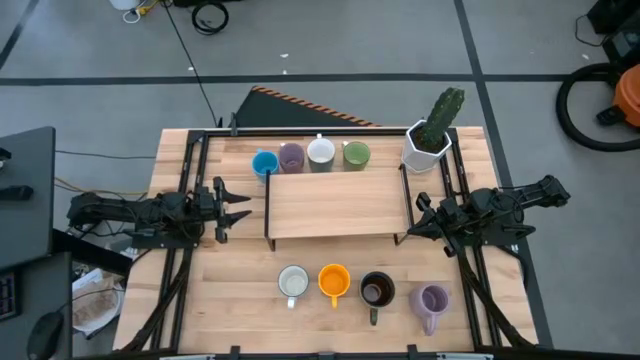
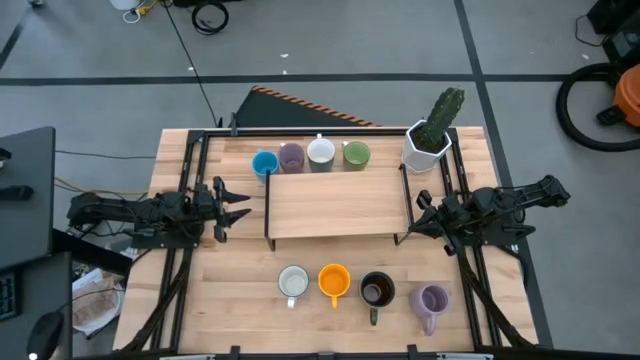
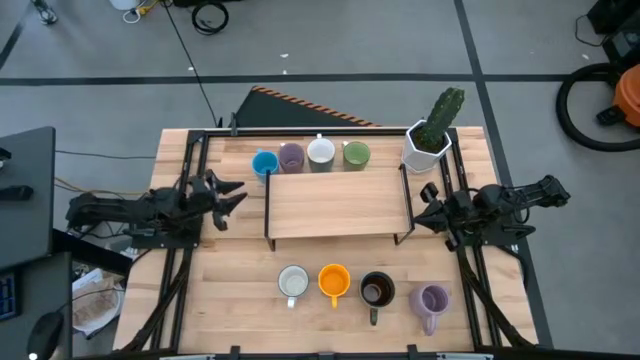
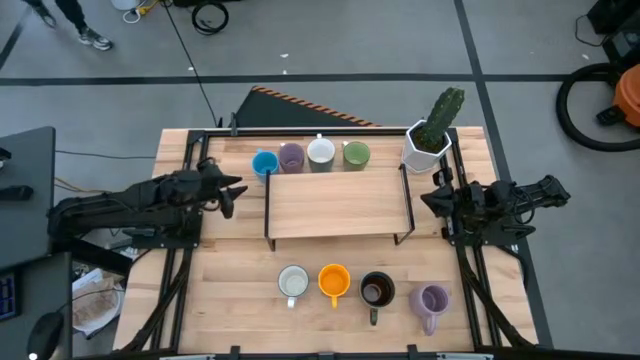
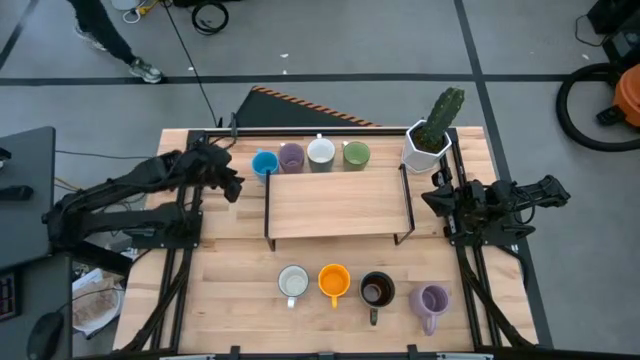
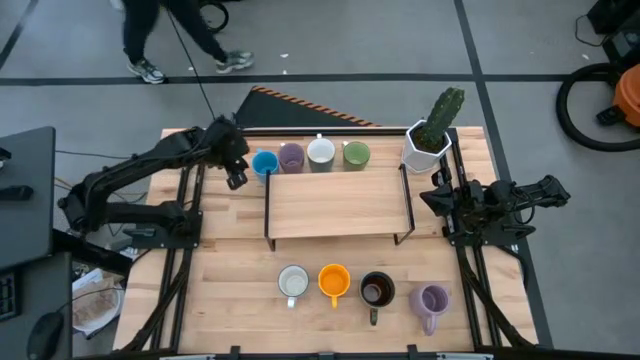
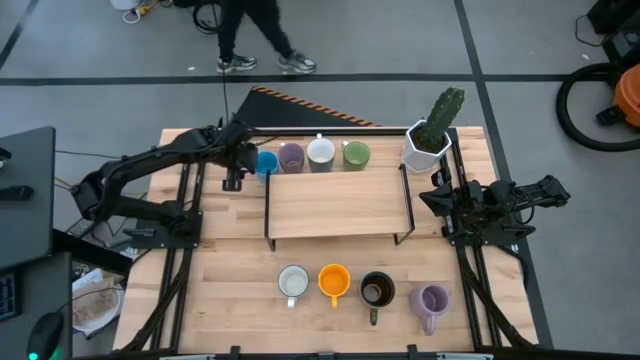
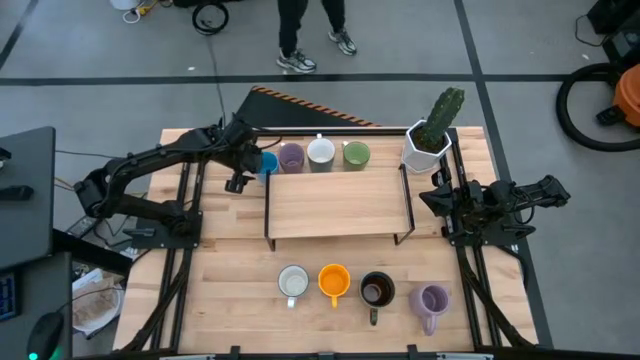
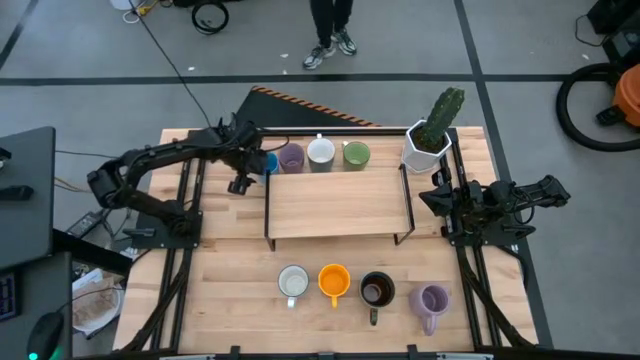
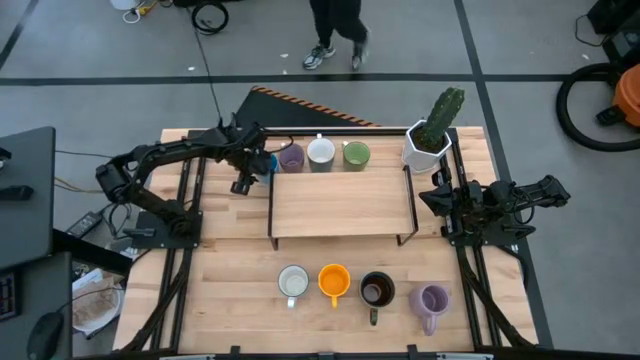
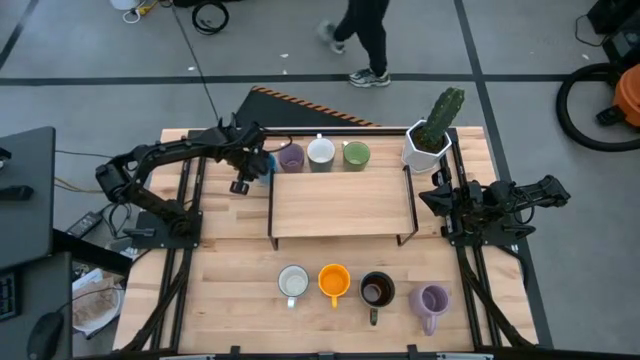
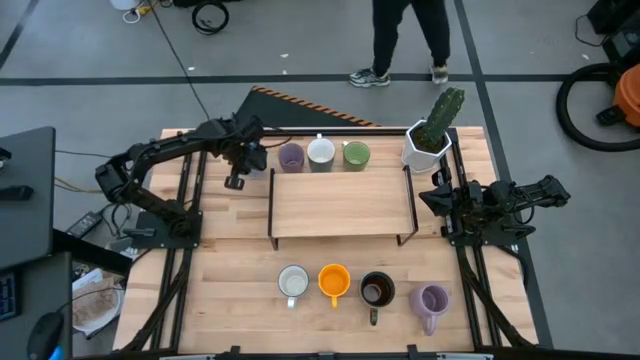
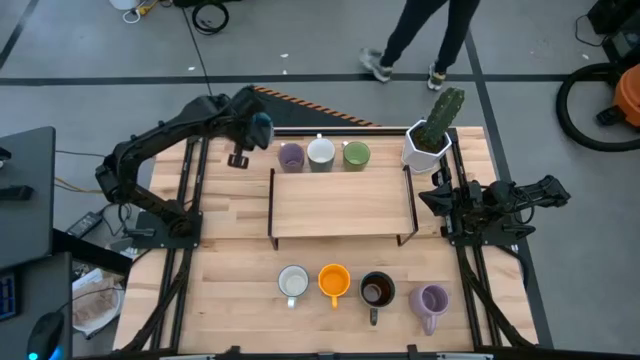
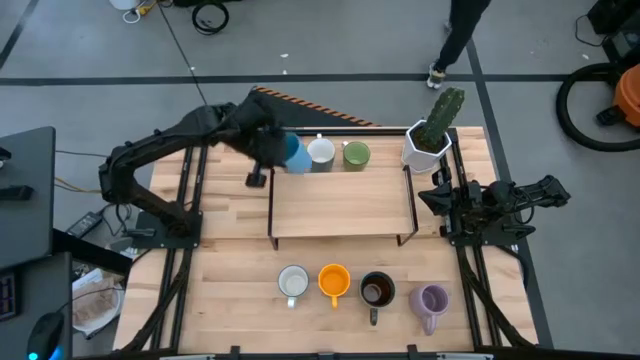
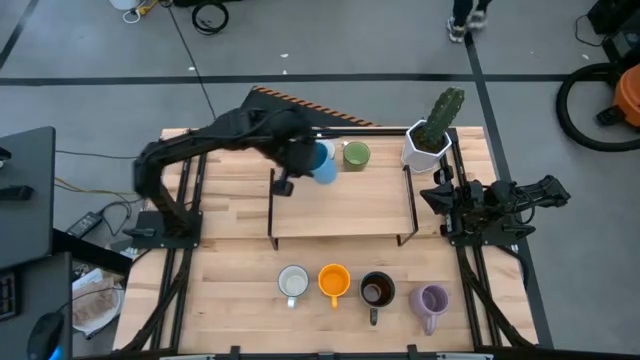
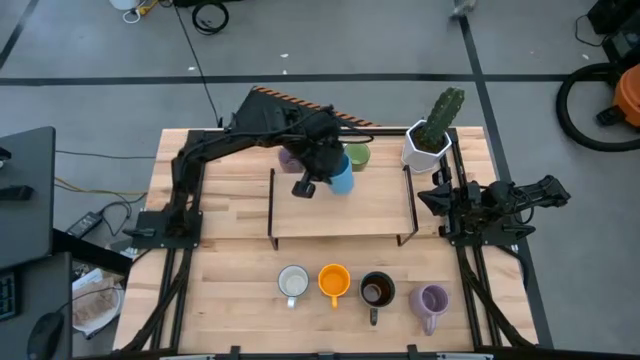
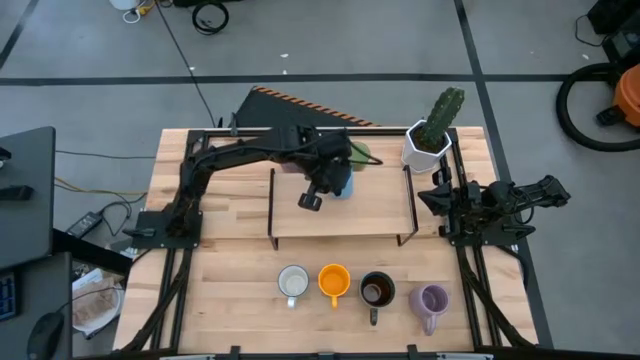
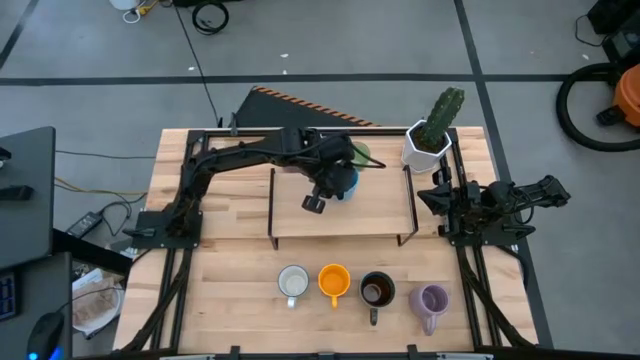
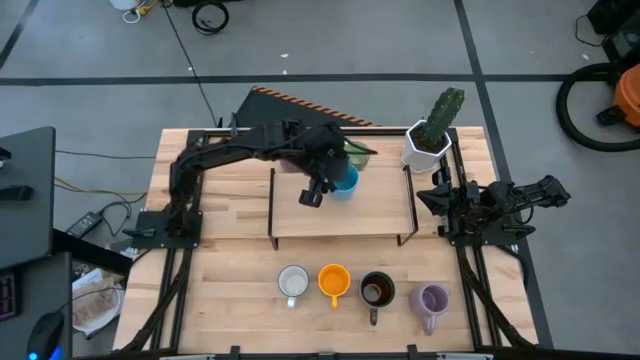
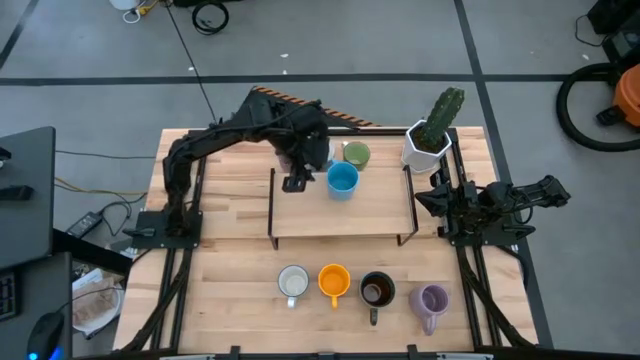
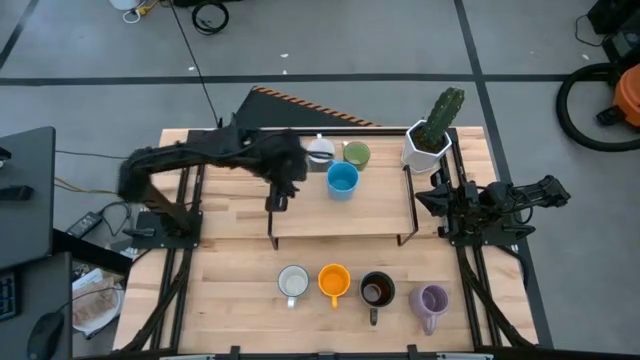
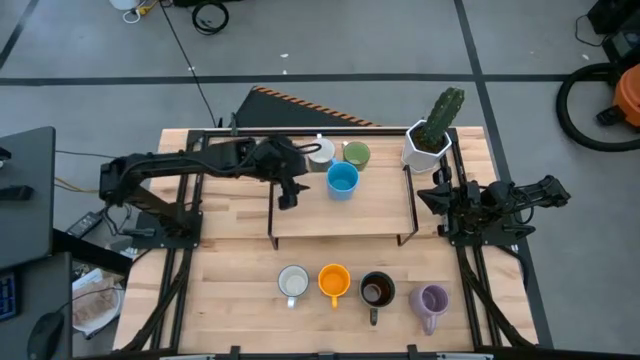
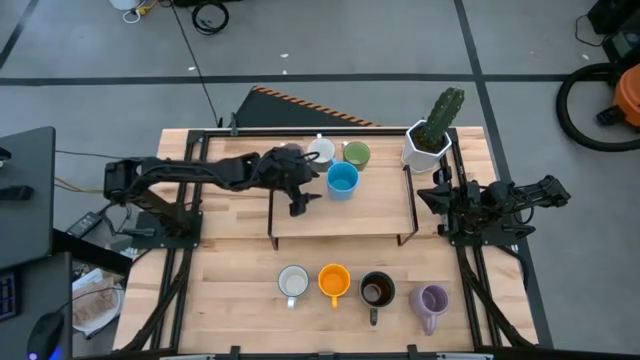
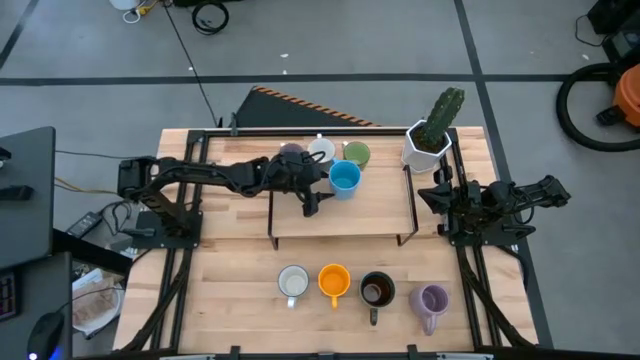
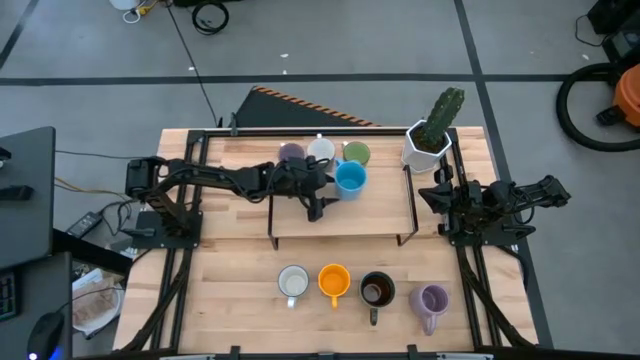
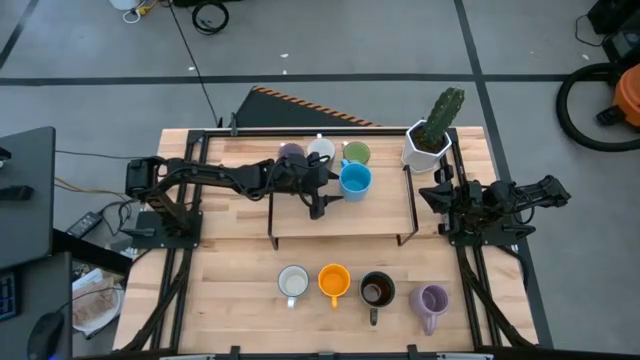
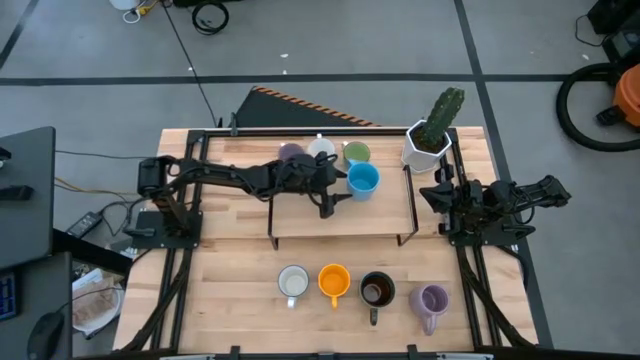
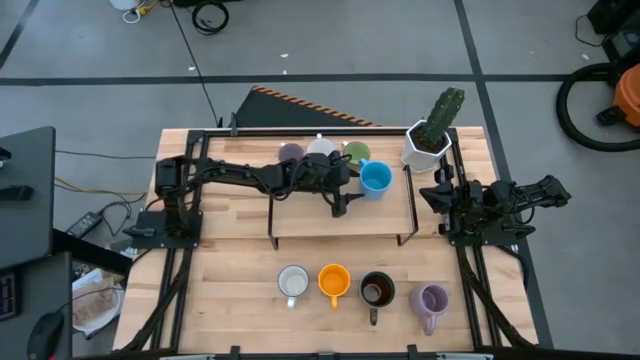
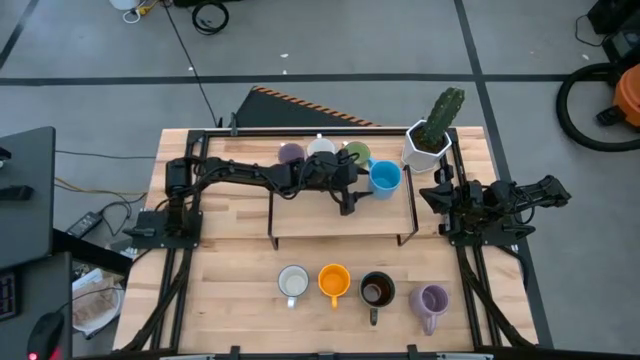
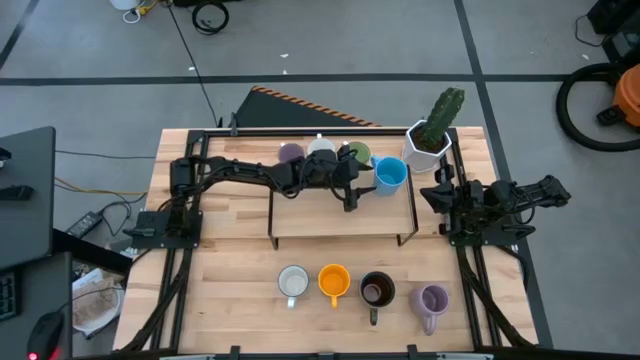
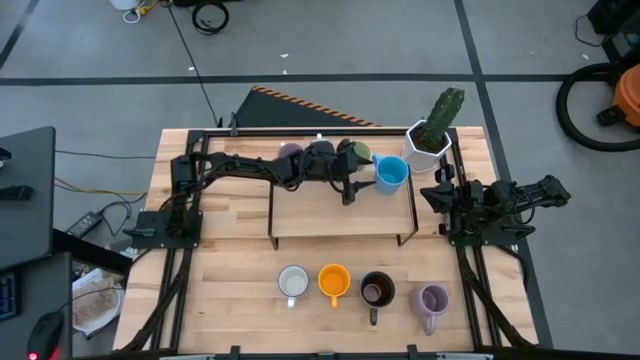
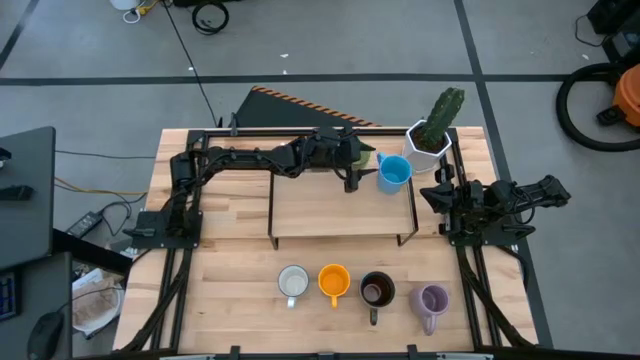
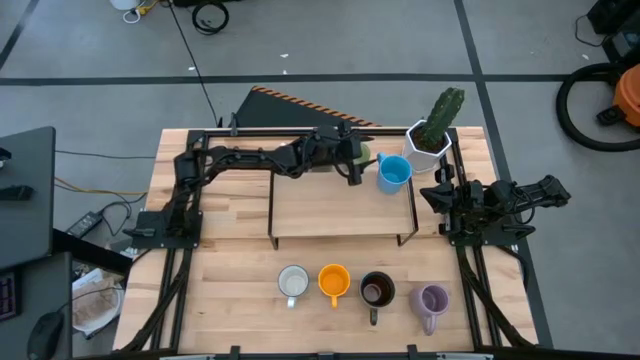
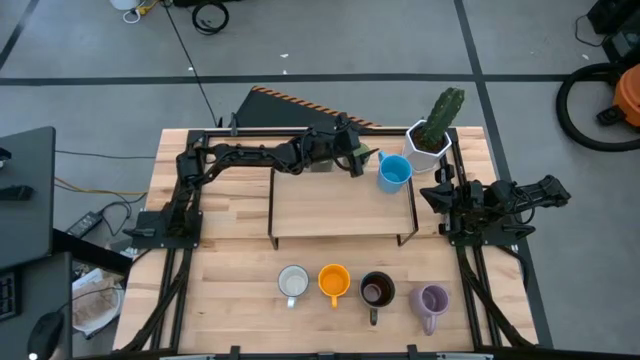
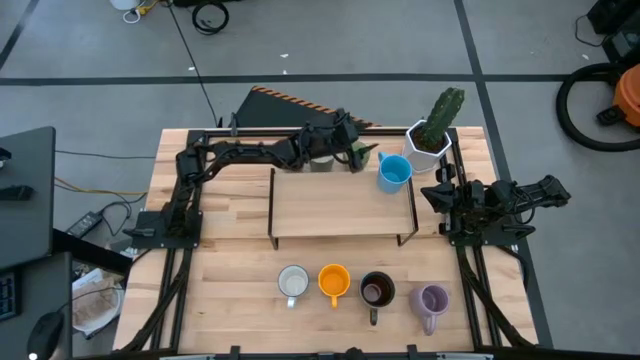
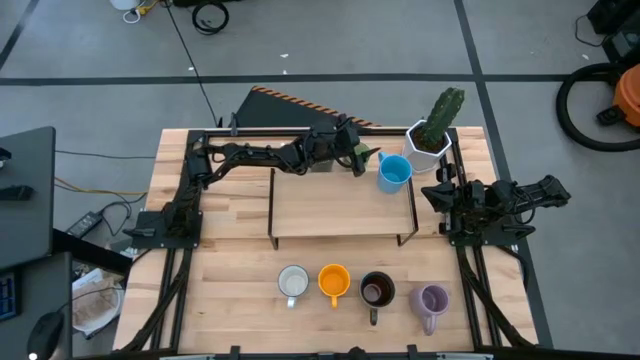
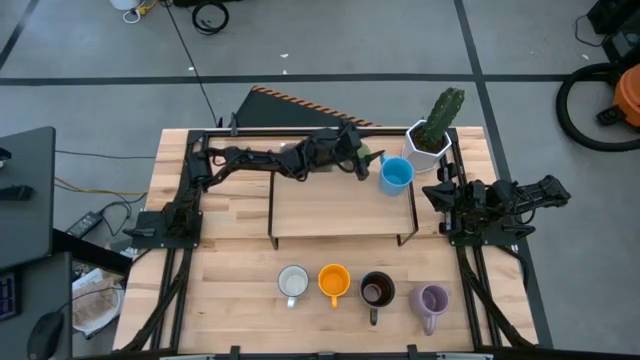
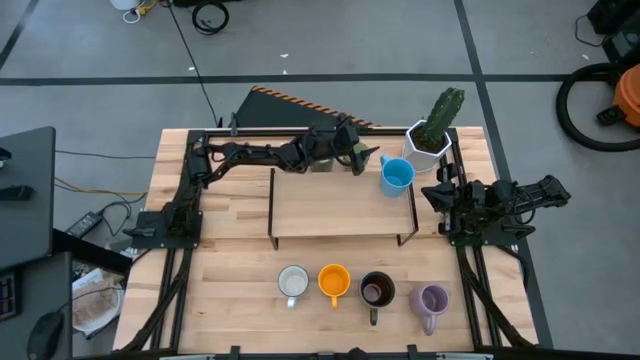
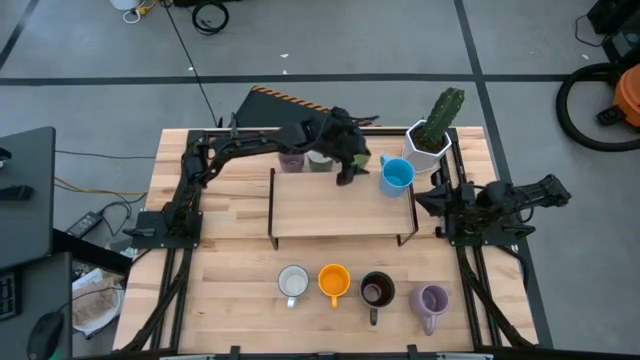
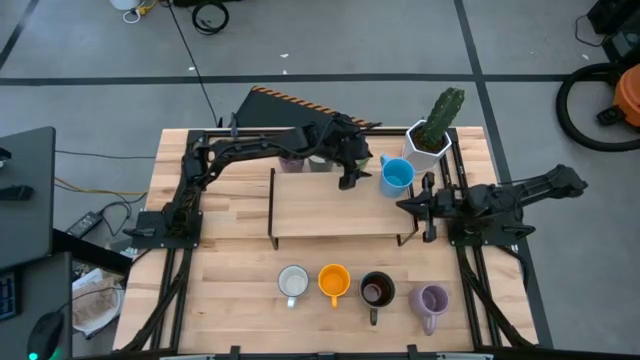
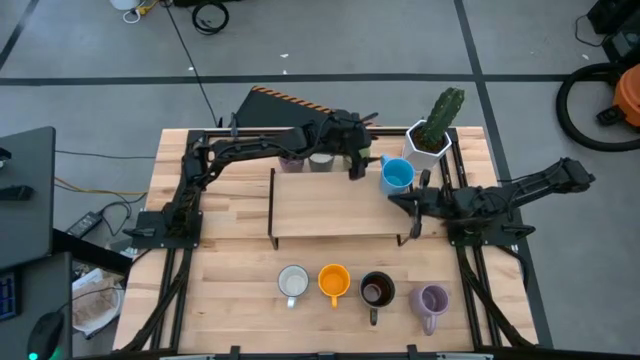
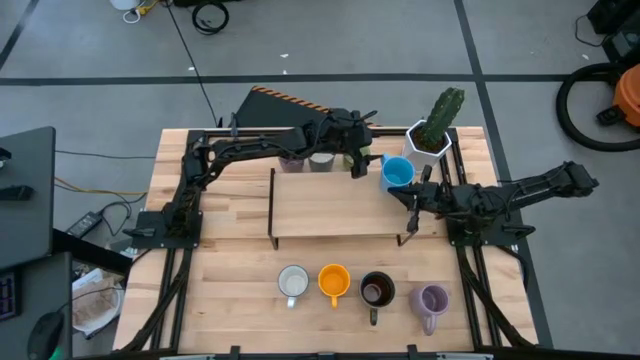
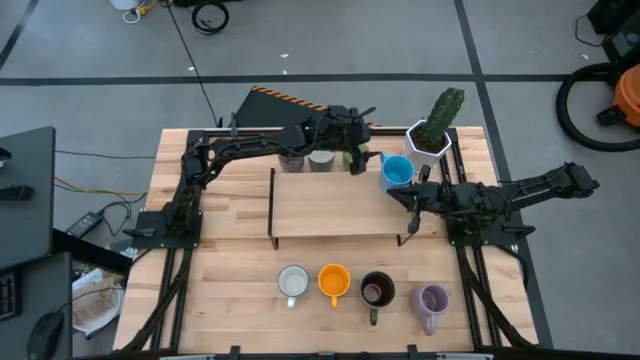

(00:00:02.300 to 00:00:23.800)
Task: Place coffee mugs
Put the light blue mug on the shelf
